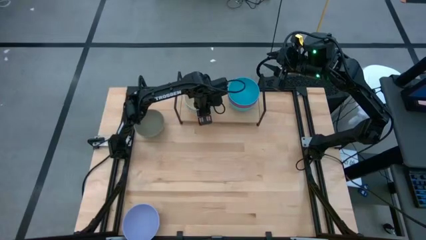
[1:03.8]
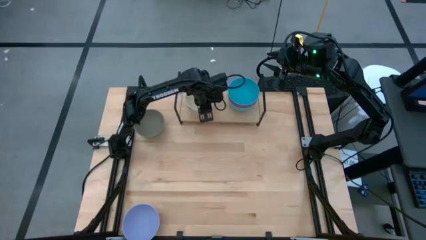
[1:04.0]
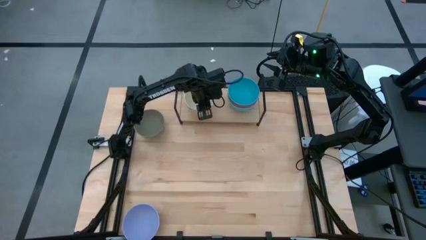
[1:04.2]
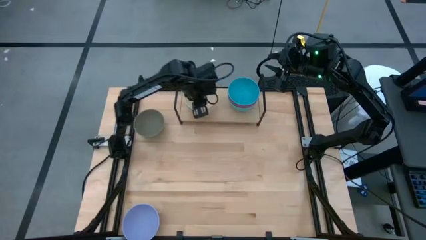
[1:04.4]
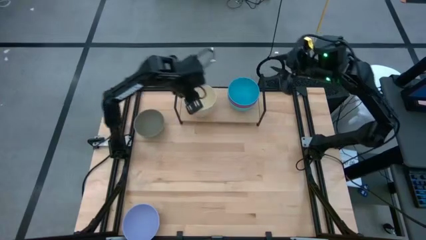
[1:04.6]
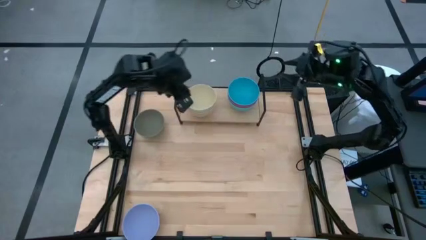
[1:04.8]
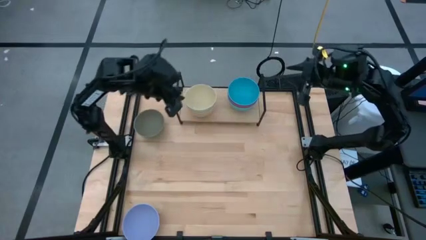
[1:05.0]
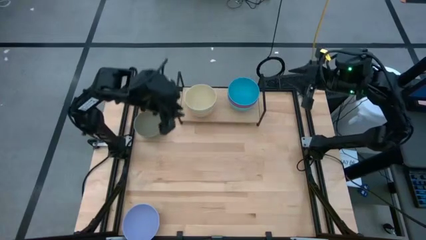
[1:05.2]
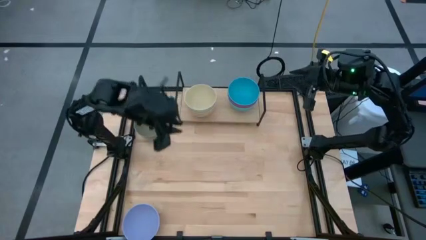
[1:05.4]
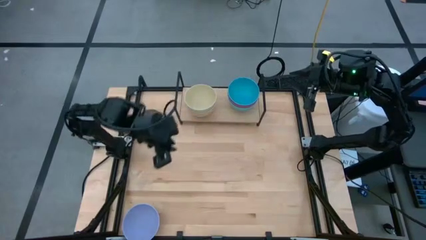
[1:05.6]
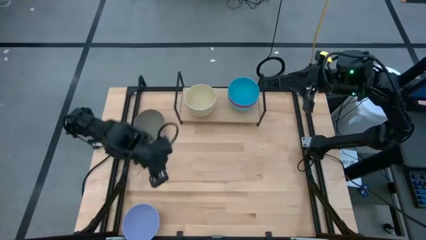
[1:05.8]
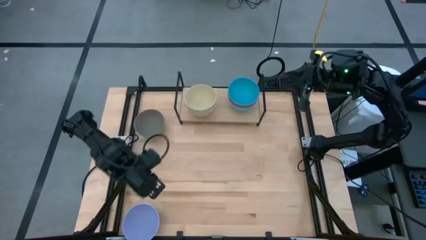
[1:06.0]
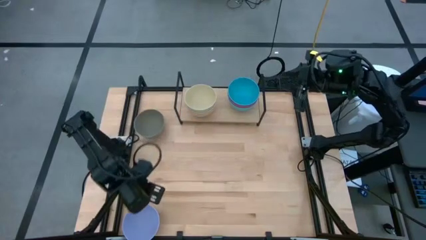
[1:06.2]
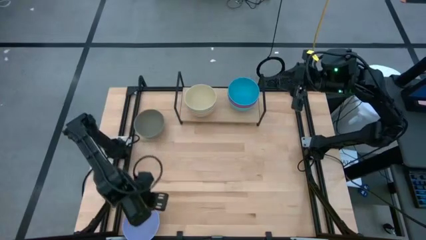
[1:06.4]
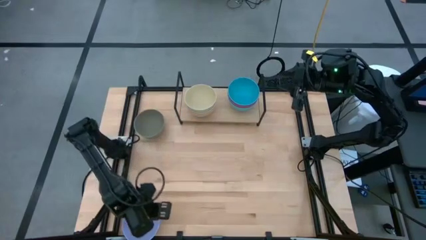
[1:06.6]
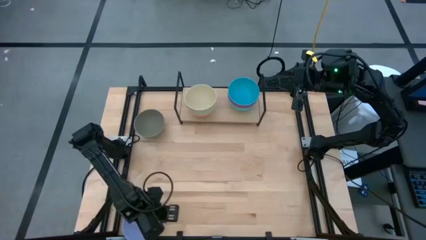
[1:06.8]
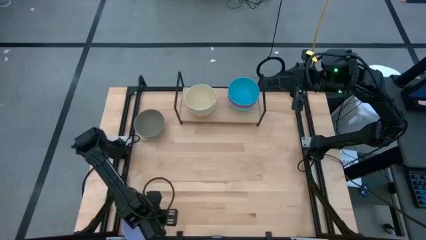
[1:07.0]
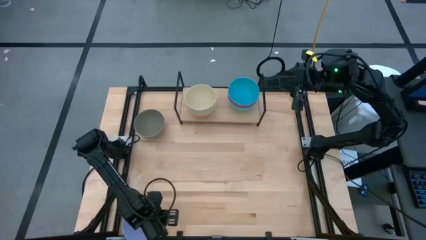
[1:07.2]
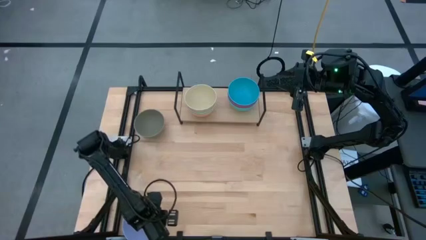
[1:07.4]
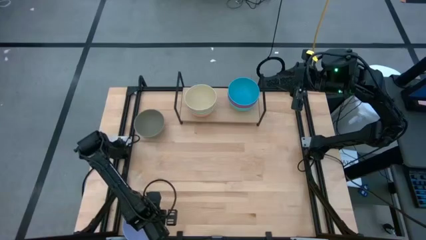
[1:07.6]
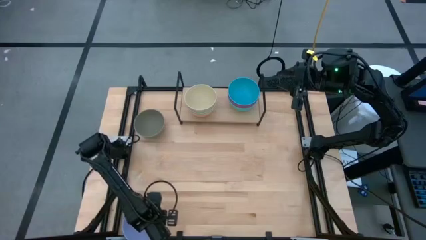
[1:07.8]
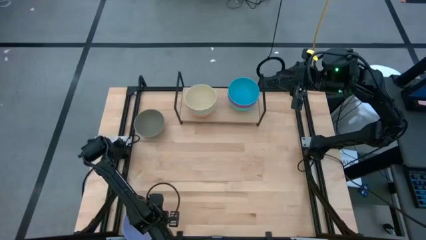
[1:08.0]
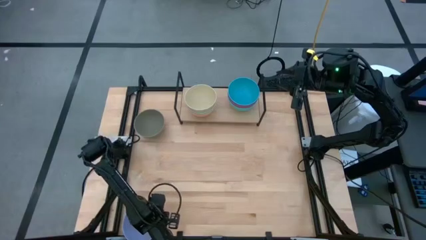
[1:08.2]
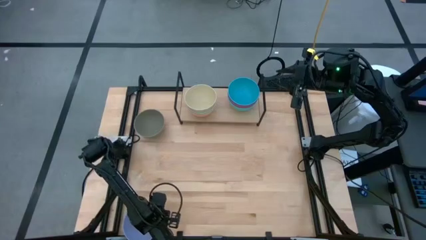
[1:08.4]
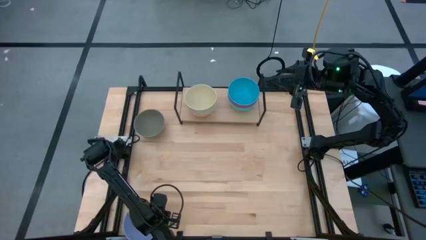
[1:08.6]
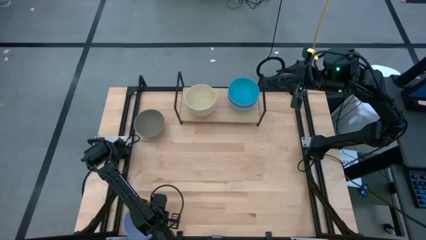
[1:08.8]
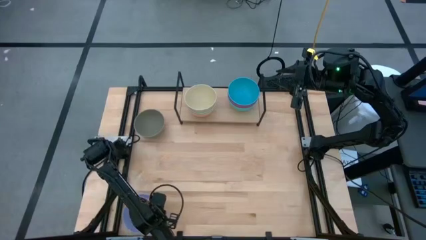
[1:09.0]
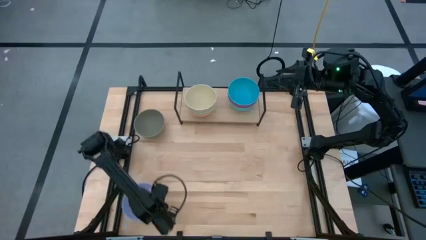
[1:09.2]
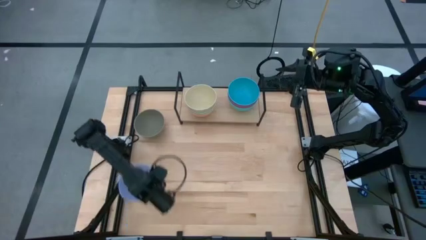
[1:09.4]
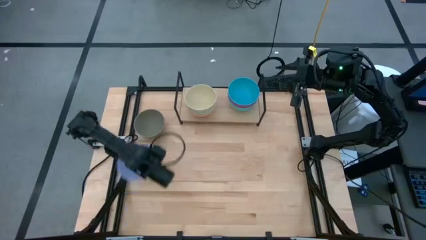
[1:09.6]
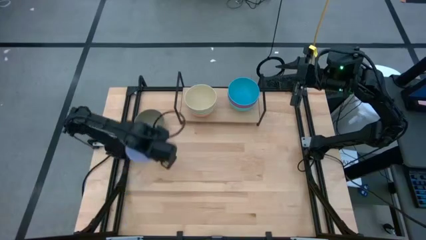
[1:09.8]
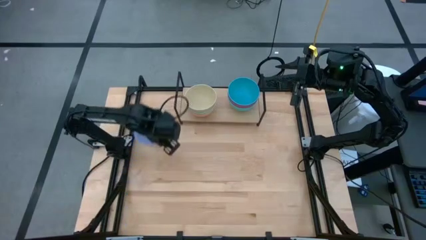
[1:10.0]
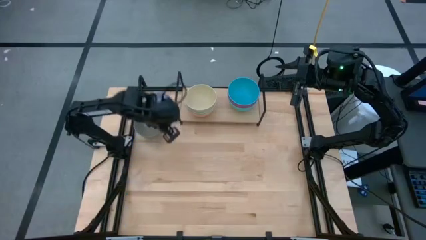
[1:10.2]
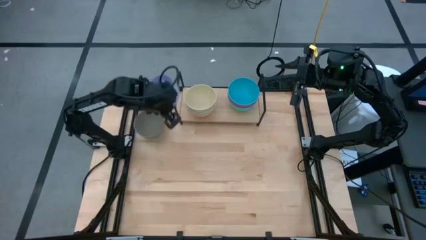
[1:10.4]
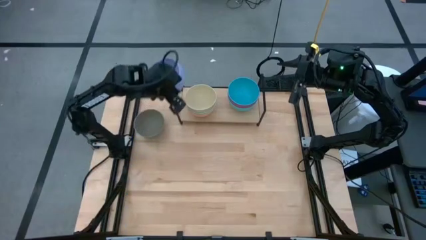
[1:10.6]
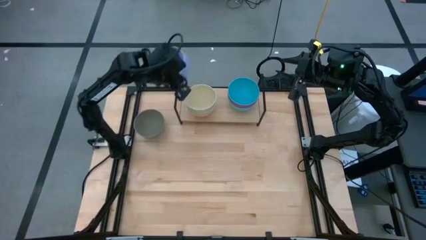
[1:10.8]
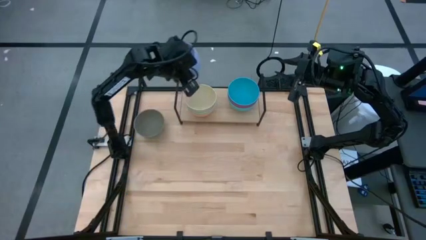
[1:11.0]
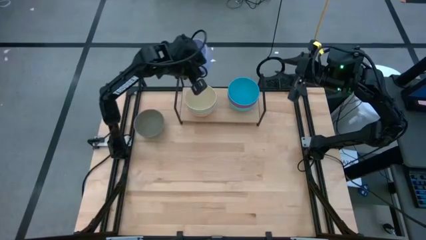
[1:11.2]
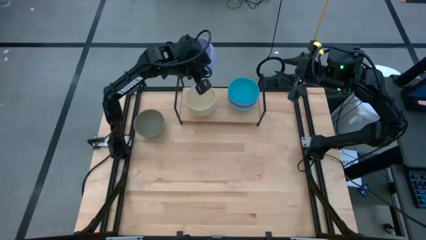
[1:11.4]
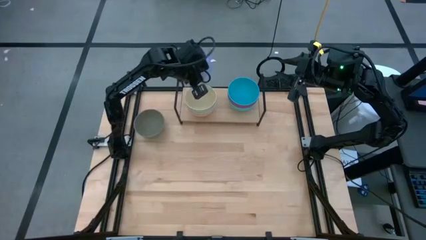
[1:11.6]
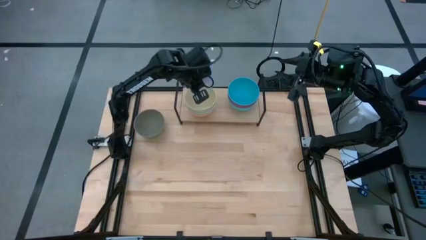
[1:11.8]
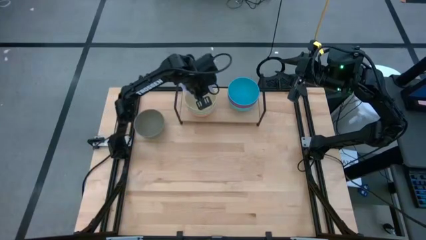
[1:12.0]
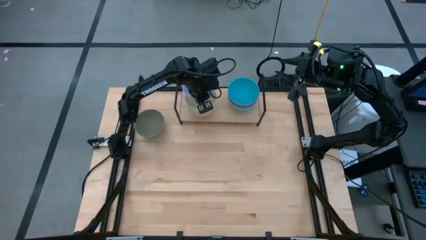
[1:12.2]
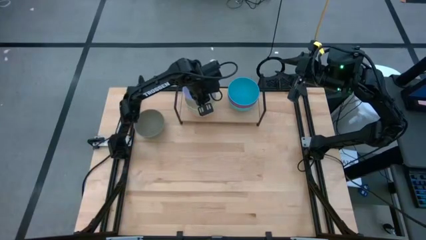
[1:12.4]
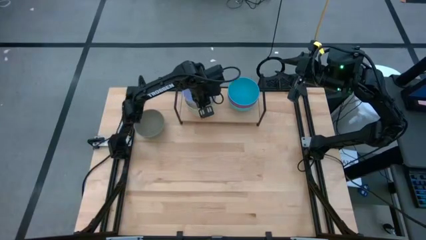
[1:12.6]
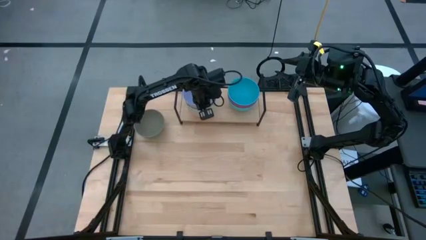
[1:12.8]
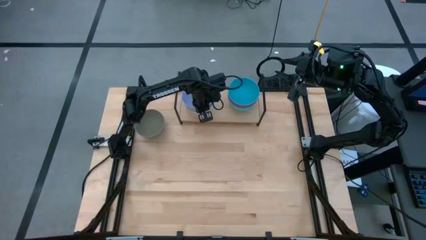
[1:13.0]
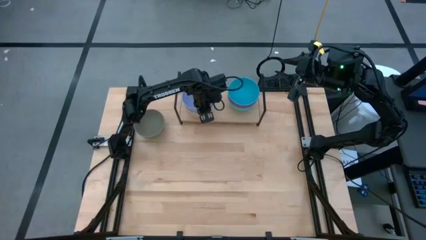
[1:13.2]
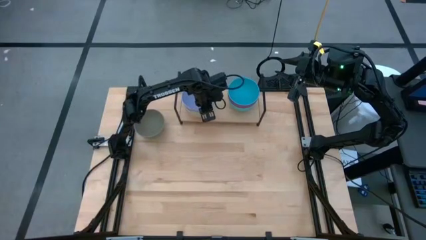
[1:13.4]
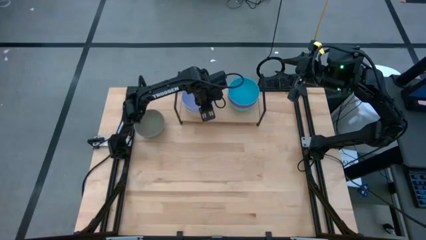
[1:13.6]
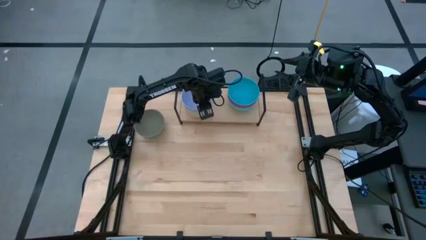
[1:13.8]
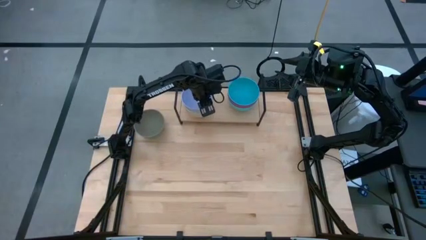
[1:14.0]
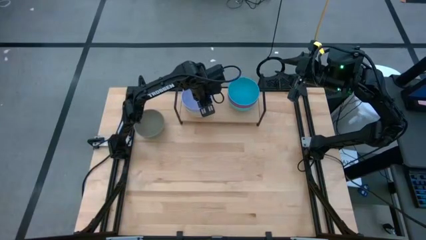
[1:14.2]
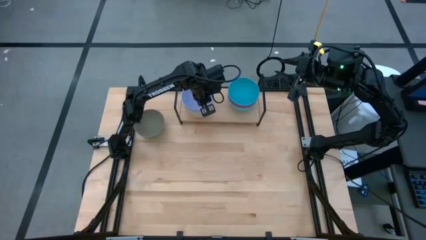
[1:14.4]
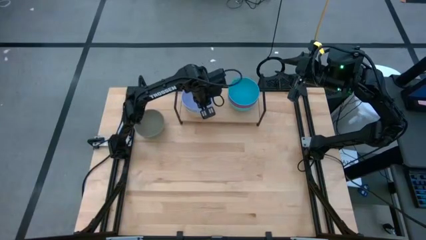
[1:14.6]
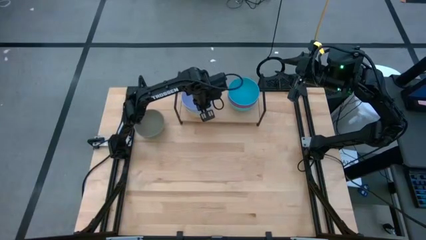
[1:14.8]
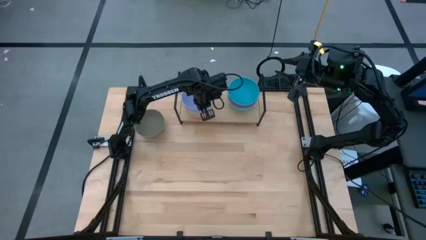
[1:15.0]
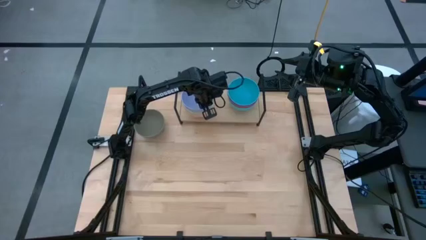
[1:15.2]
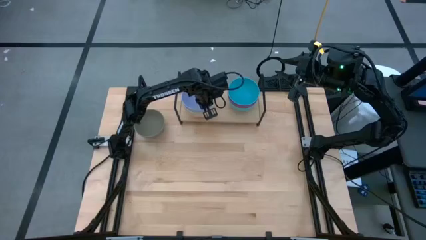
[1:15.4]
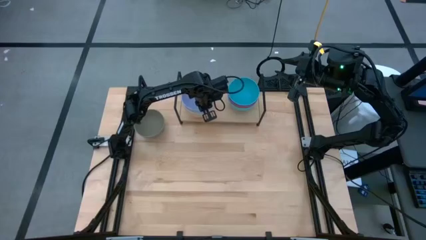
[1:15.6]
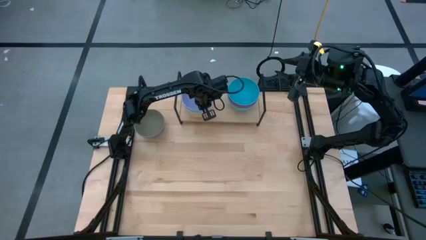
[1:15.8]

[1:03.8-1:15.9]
Task: Place and stack bowls onto a shelf
Stack the purple bowl on top of the brown bowl on the shelf
